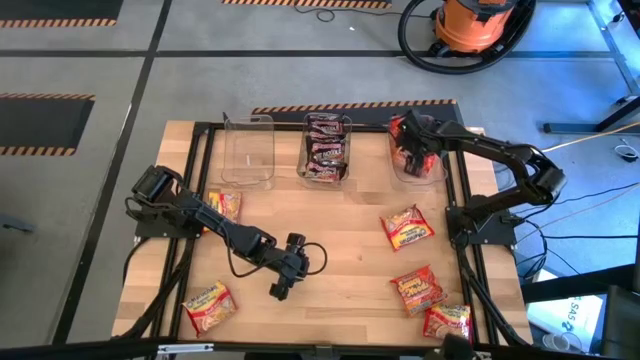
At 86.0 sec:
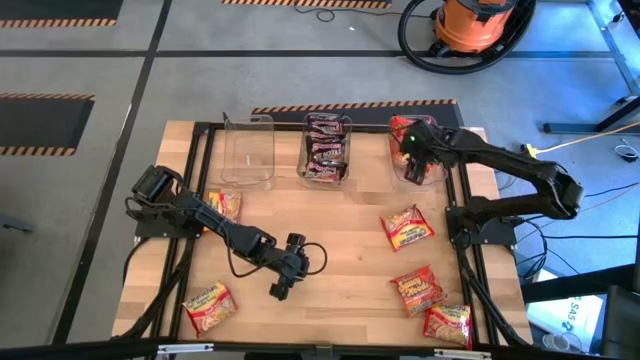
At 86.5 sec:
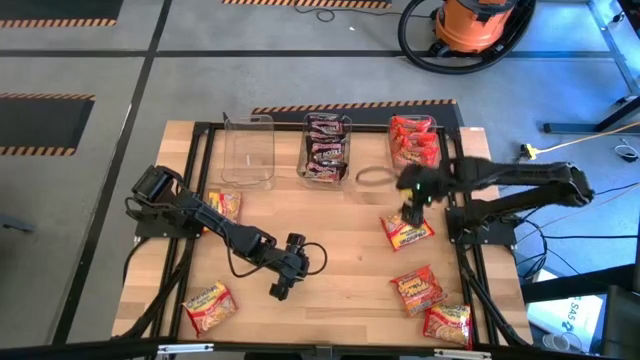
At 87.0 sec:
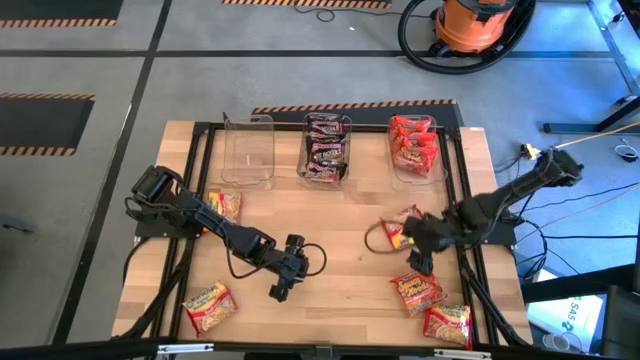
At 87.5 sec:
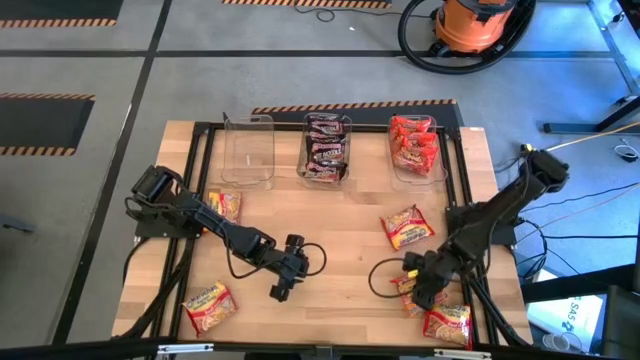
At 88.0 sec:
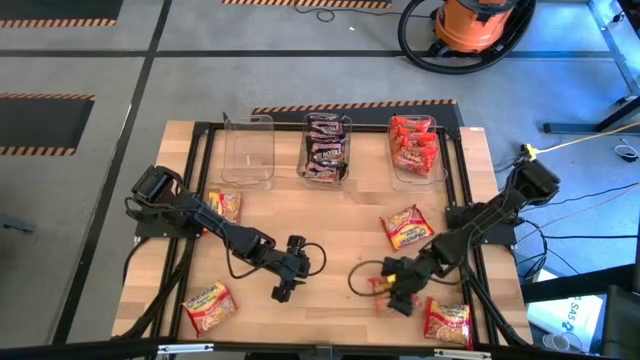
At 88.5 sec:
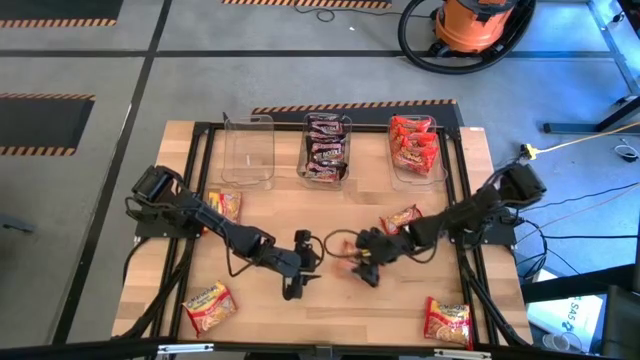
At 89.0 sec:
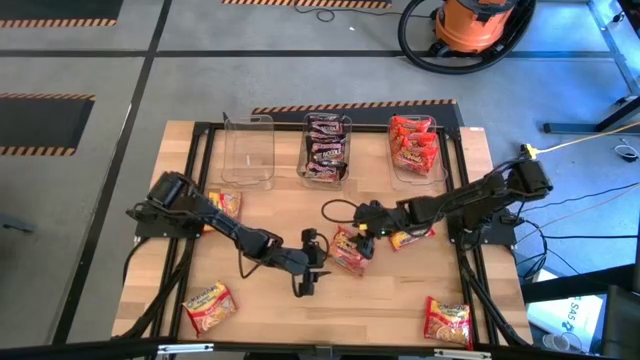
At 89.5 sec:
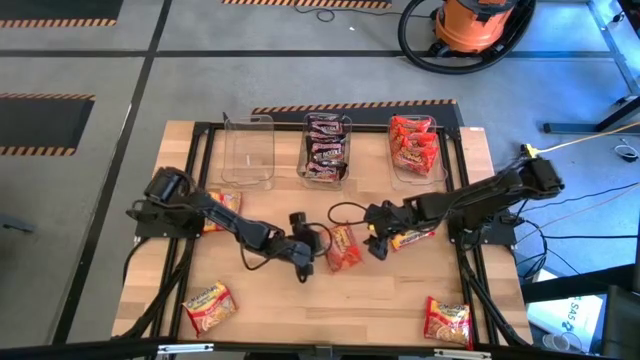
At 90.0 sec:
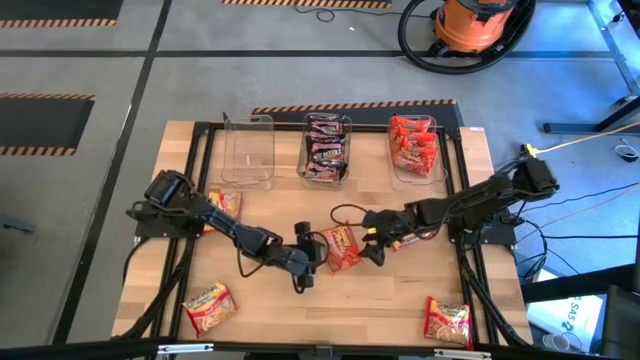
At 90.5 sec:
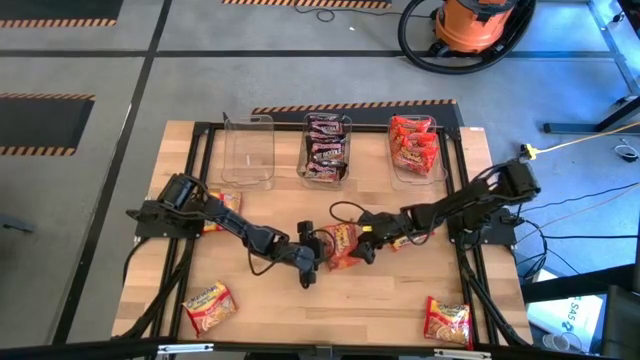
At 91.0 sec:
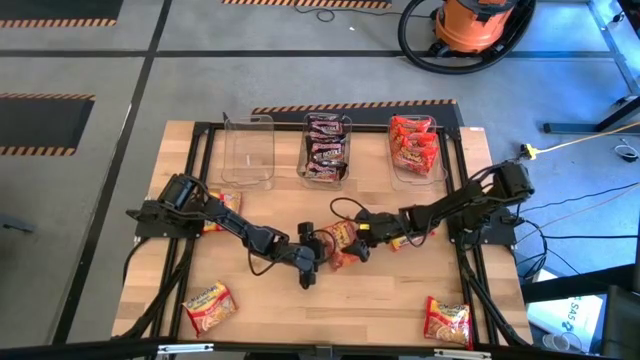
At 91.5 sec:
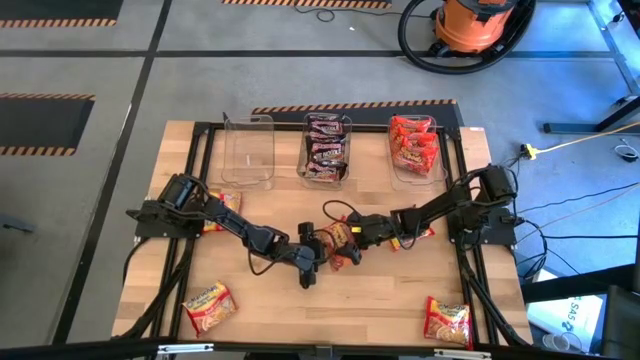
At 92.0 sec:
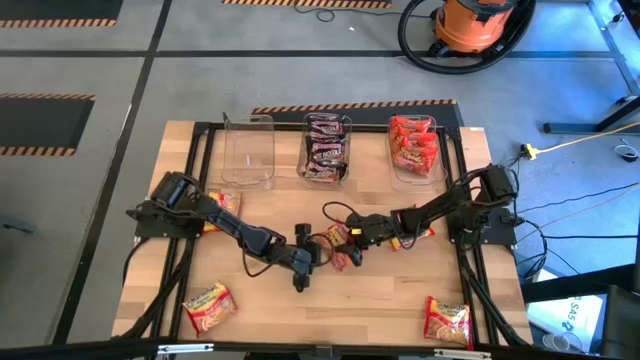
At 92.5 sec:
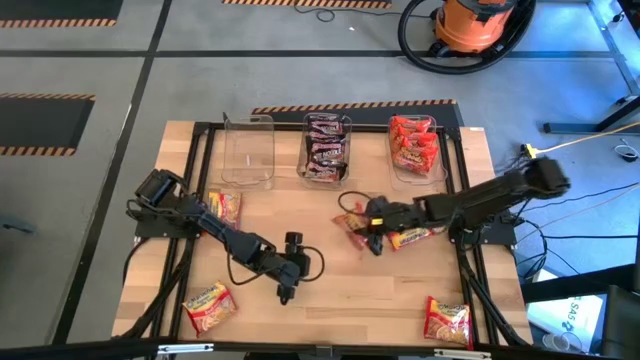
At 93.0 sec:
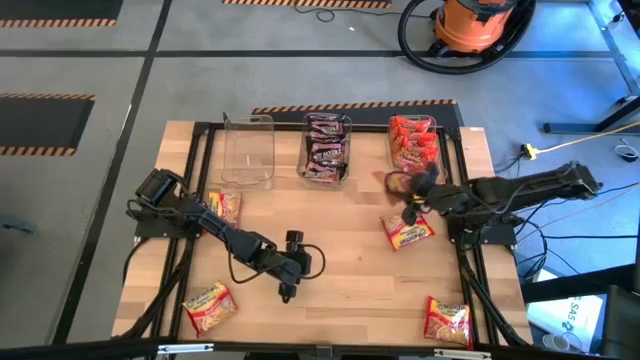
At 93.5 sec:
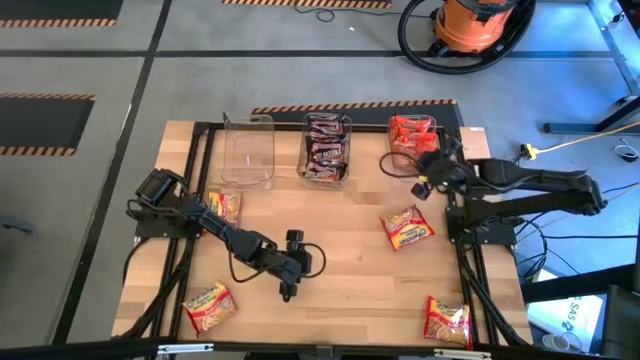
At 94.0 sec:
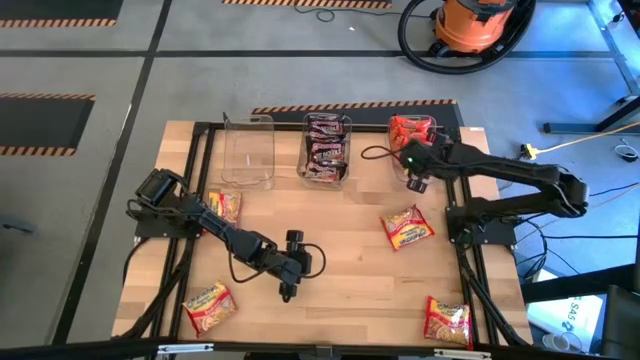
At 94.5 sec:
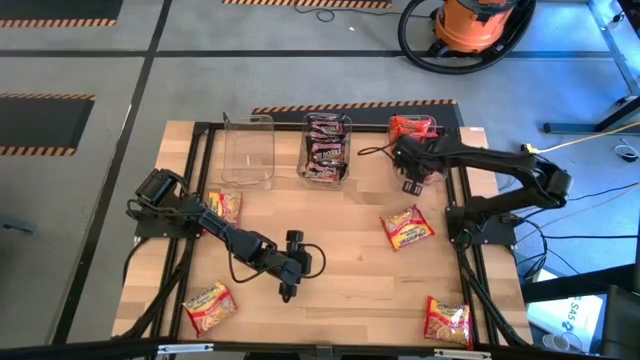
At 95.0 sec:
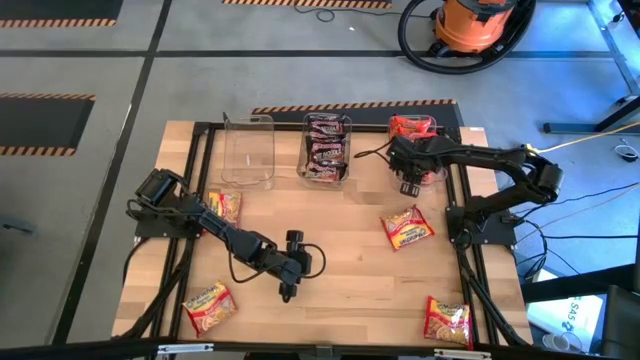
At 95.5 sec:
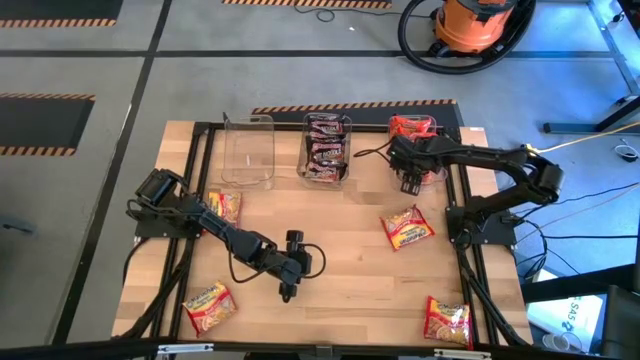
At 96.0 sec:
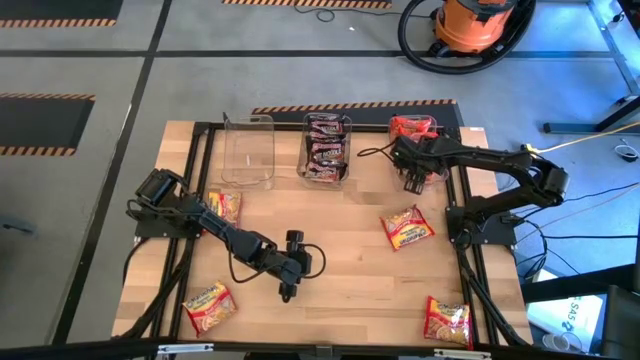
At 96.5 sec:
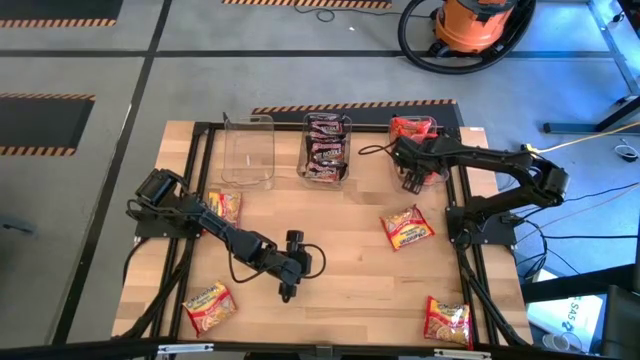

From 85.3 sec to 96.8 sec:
Task: Sort Maruchan noodles
Put the orange noodle pack into the right transparent bin

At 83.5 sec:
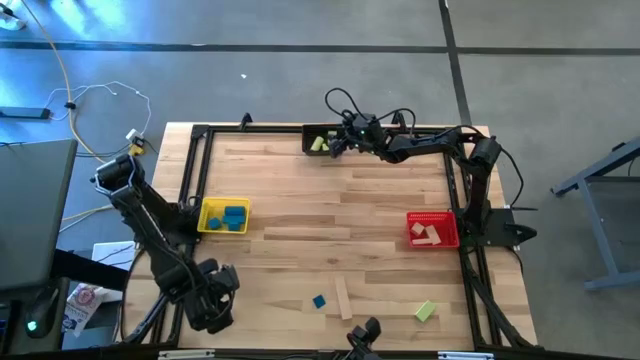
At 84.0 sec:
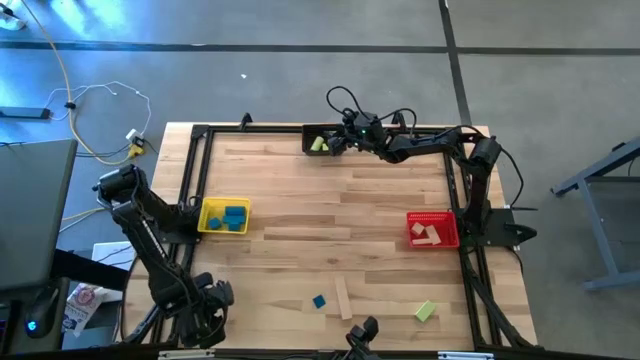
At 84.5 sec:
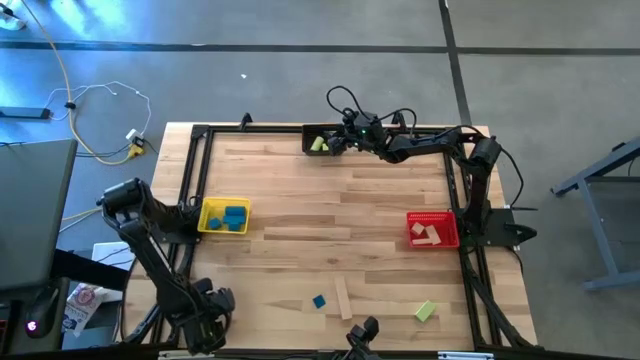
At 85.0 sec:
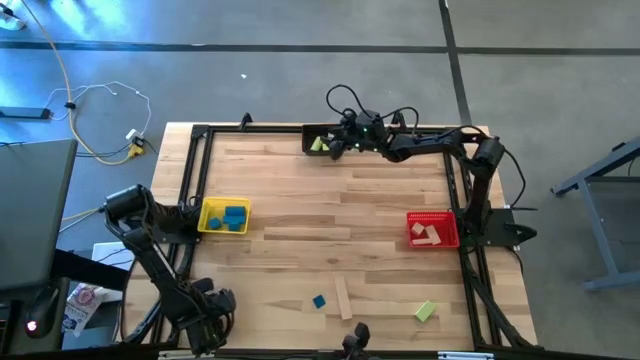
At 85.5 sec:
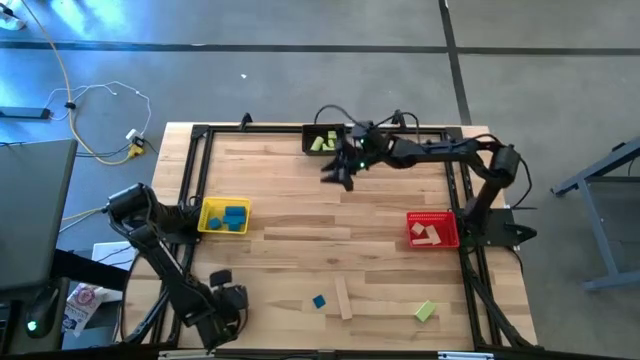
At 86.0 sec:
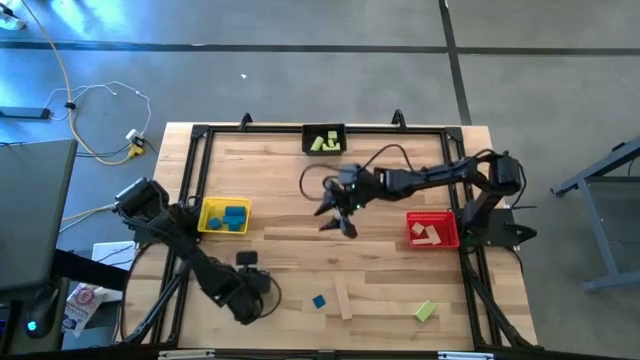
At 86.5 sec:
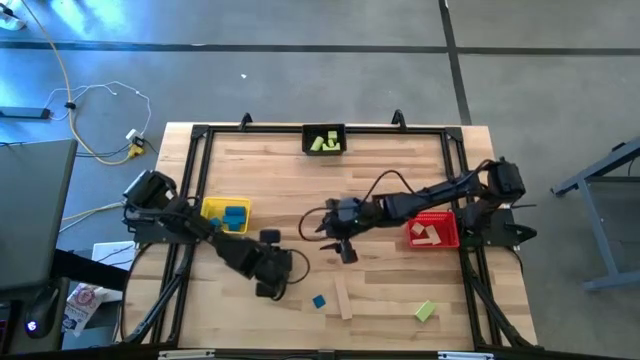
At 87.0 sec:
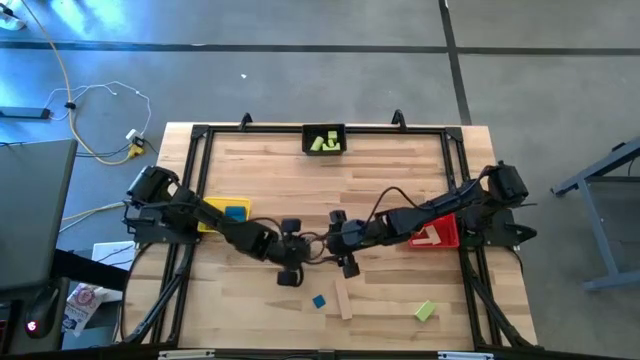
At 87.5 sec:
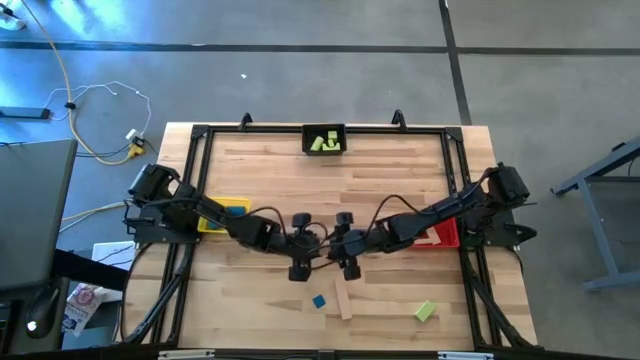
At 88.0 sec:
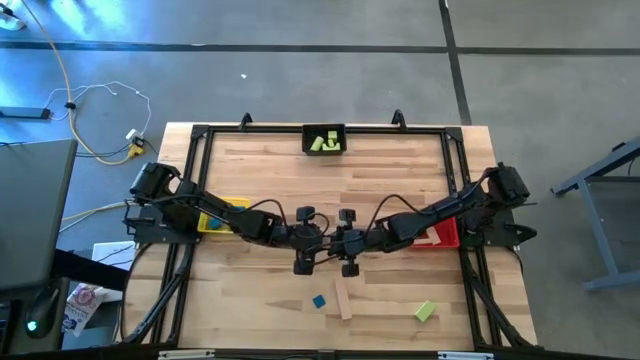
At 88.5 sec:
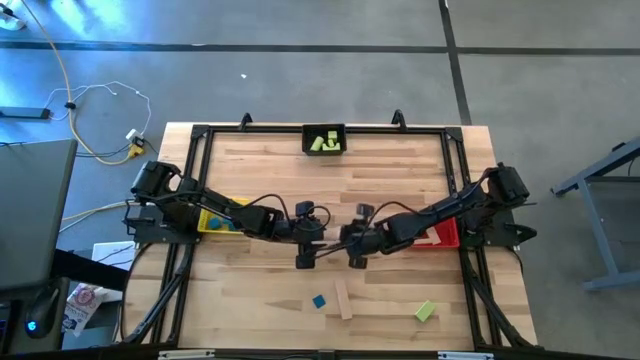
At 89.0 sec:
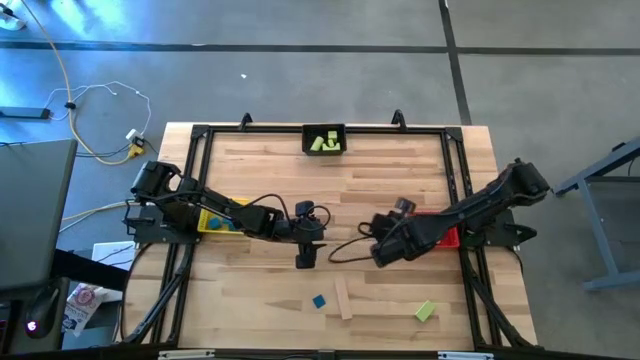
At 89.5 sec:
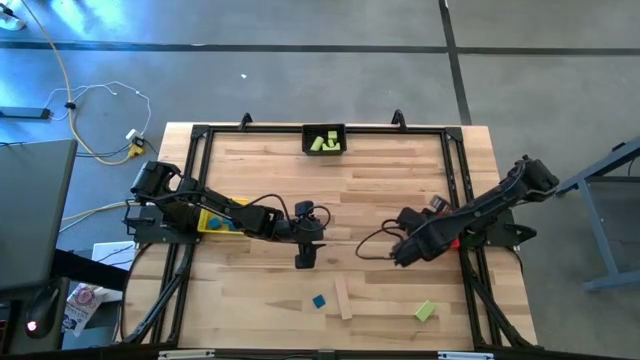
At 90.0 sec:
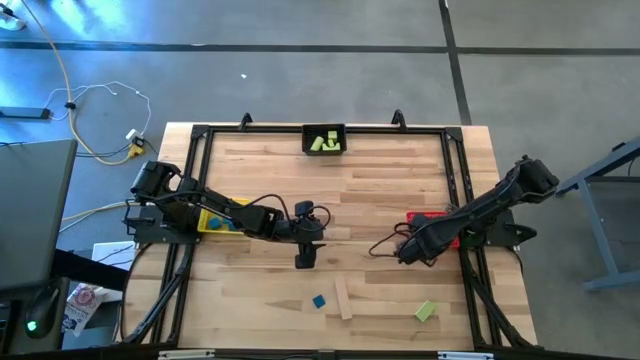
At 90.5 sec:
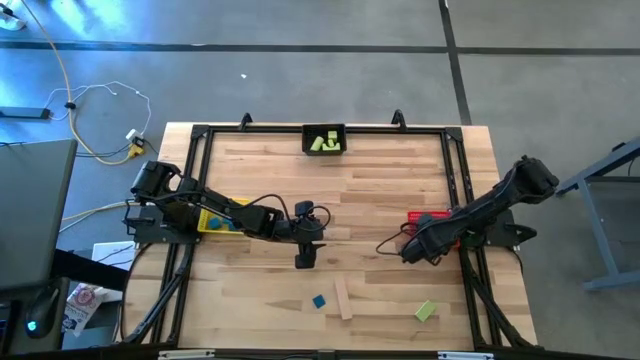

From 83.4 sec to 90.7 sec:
Task: Sort & place blocks by color
Put the light brown block into the red bin
